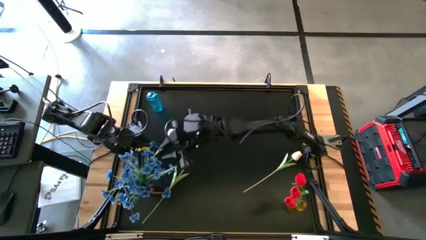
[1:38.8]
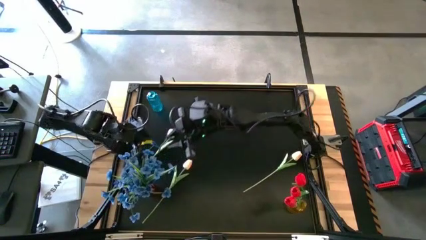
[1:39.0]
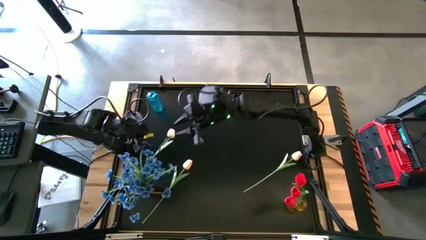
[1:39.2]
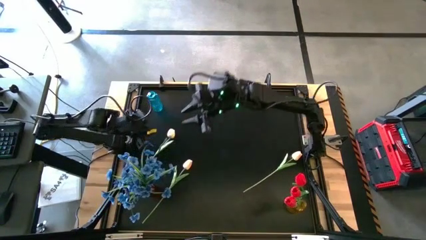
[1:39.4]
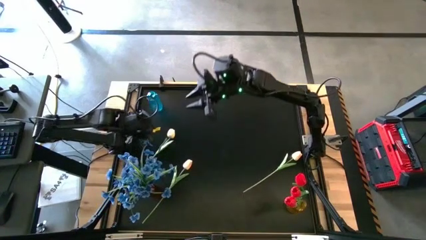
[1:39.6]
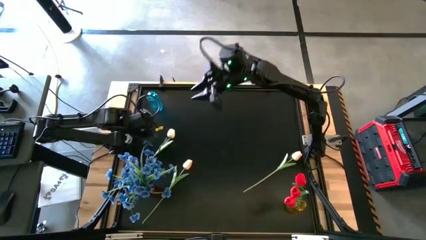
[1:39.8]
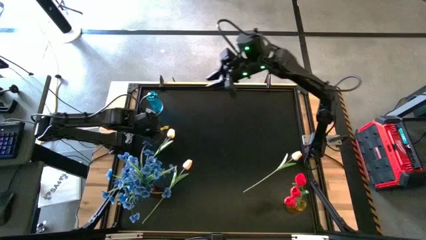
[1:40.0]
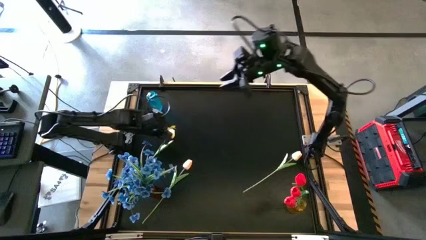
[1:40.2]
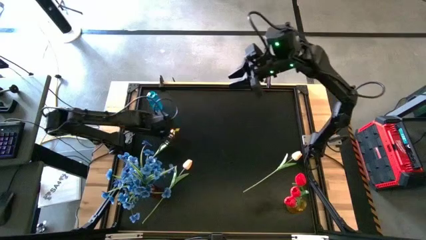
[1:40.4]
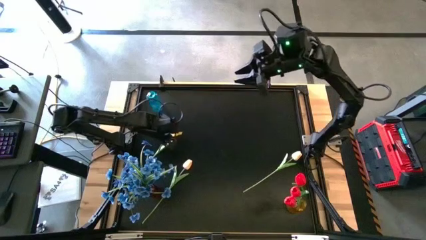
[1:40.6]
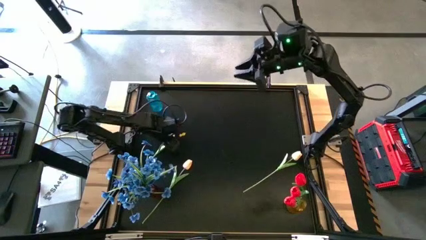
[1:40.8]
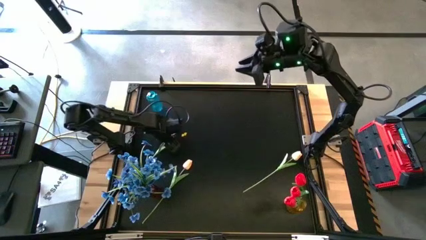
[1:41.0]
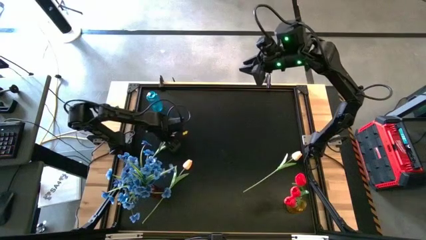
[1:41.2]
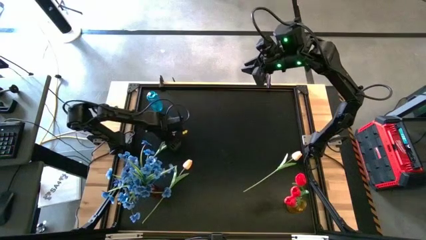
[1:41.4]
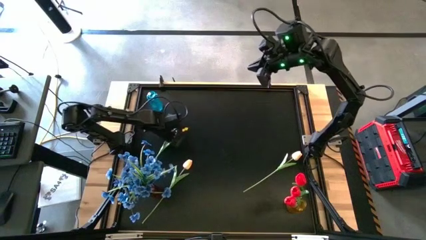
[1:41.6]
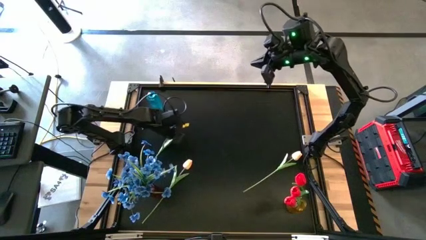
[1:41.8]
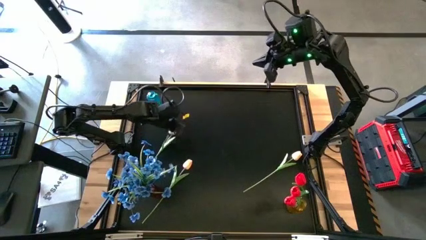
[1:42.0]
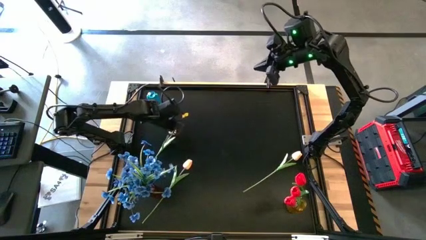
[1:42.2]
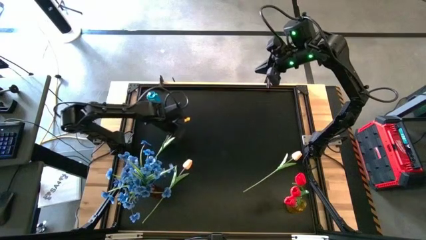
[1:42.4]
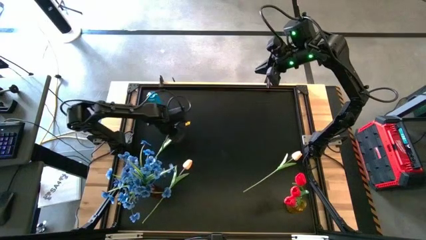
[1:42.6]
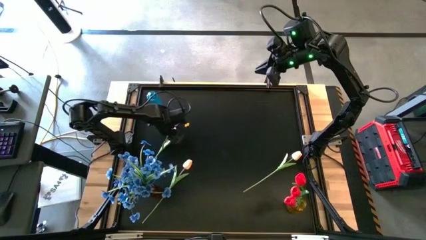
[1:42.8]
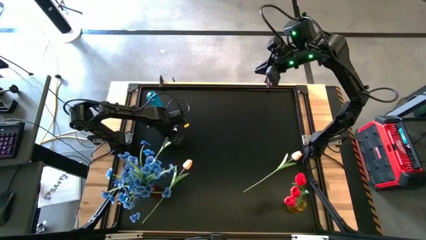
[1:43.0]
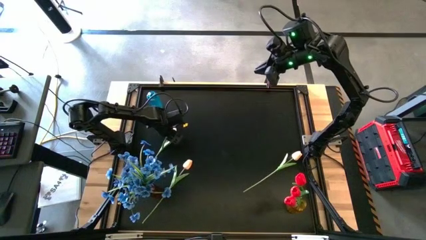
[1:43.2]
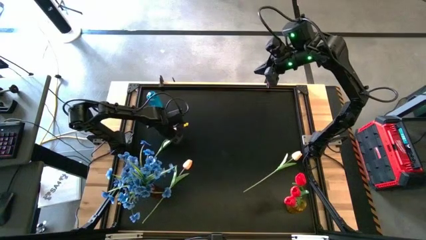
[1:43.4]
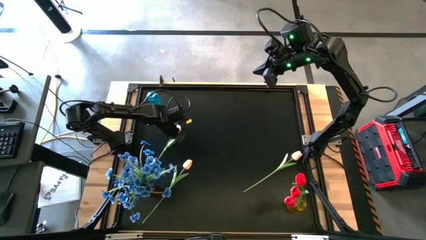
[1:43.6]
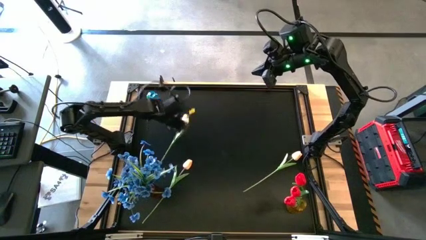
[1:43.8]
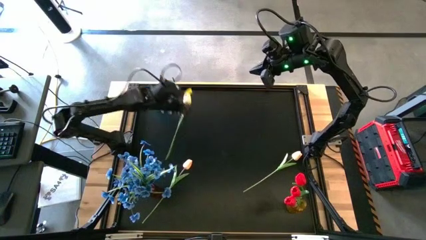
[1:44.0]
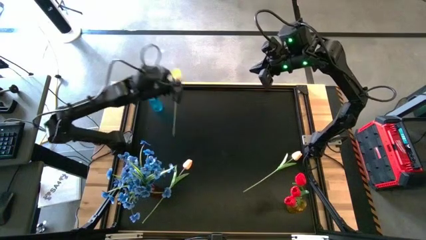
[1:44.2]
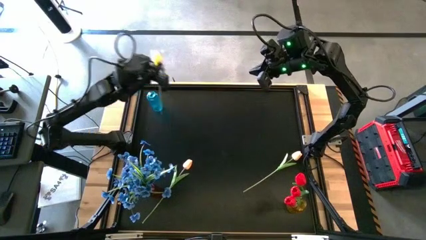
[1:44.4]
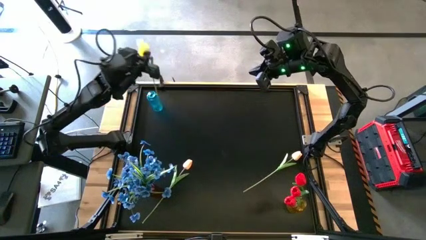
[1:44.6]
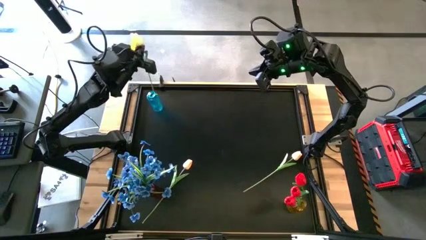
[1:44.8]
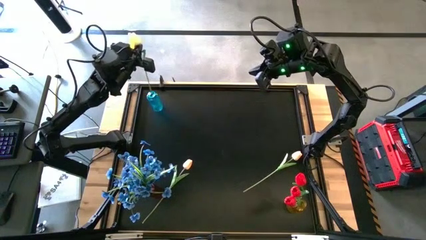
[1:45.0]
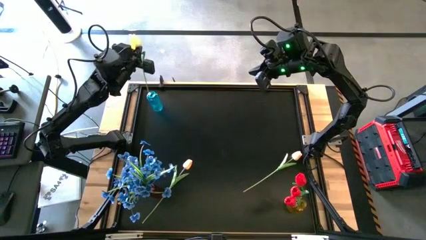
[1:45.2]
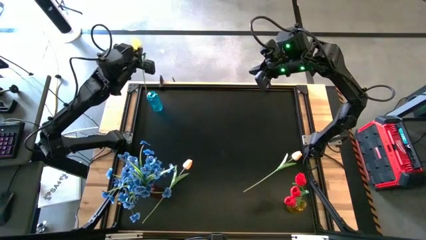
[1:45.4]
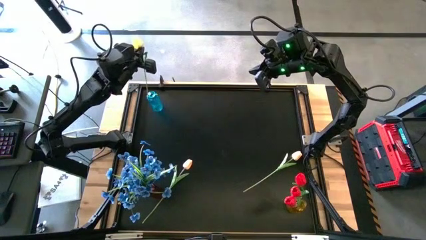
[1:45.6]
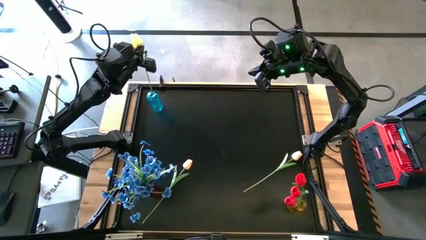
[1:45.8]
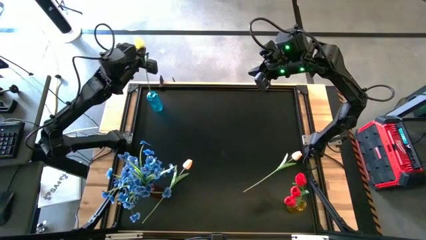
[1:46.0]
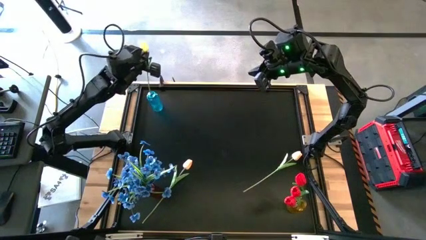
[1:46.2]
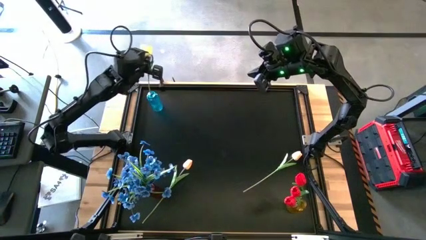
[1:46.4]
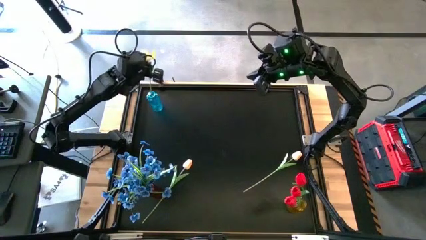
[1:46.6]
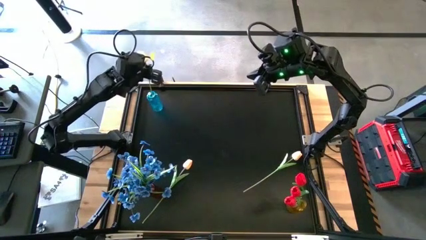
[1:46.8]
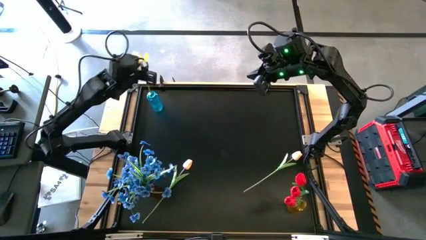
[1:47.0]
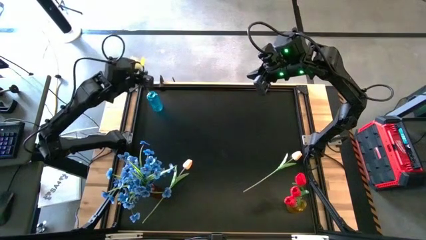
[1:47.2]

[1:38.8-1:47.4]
Task: Sort flowers into vase by color
Put the top white flower into the blue vase

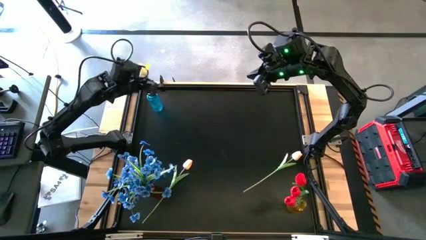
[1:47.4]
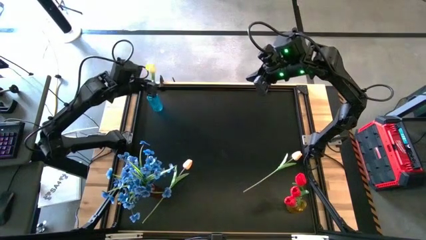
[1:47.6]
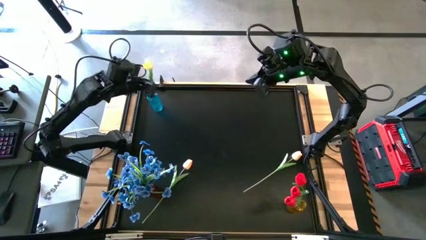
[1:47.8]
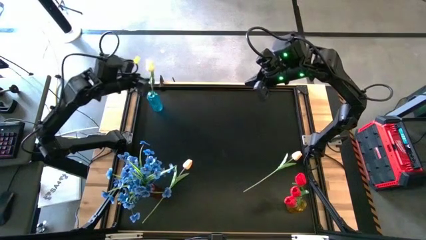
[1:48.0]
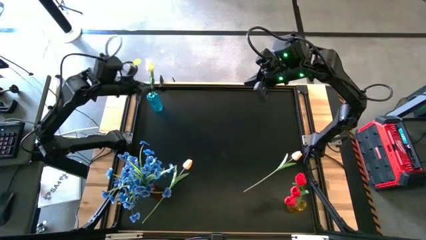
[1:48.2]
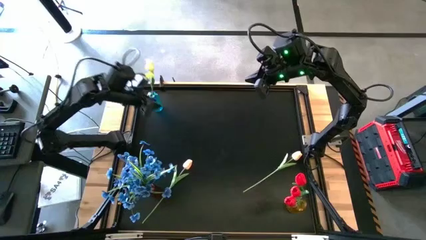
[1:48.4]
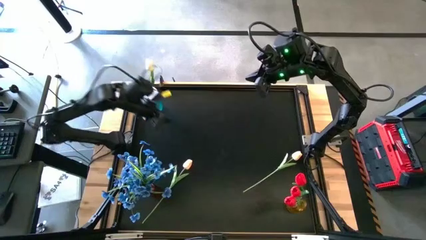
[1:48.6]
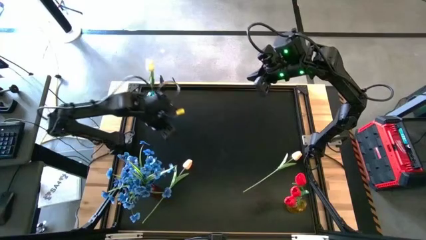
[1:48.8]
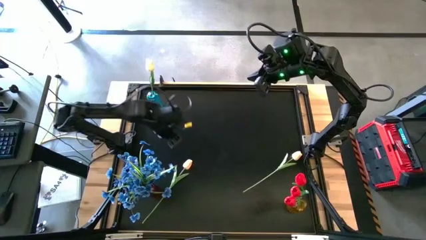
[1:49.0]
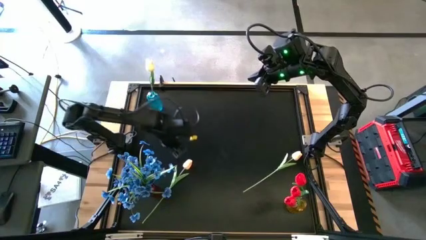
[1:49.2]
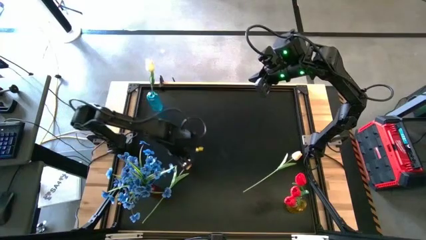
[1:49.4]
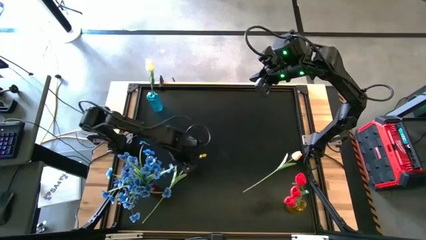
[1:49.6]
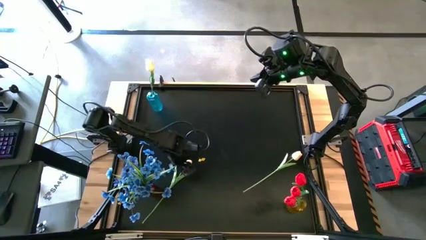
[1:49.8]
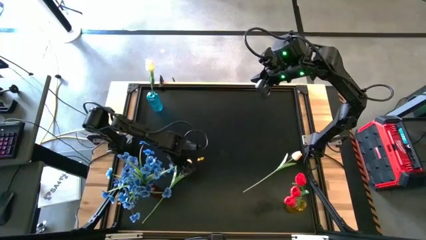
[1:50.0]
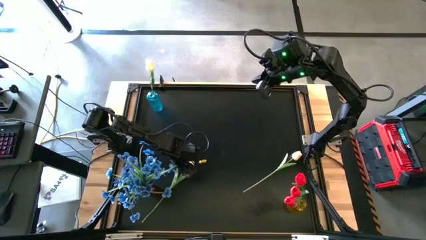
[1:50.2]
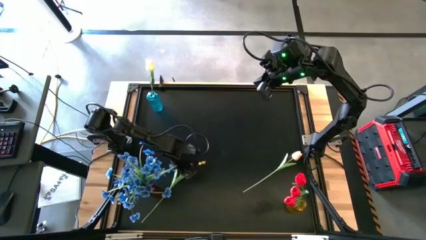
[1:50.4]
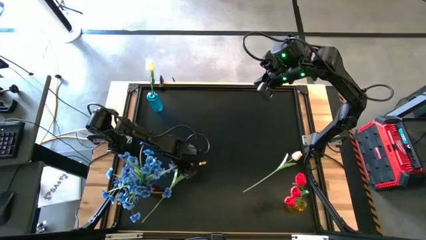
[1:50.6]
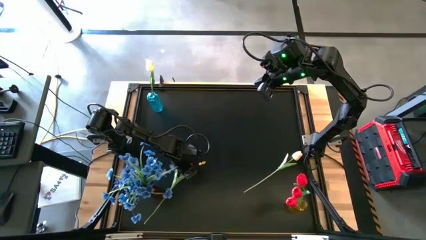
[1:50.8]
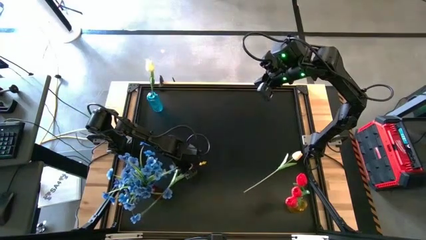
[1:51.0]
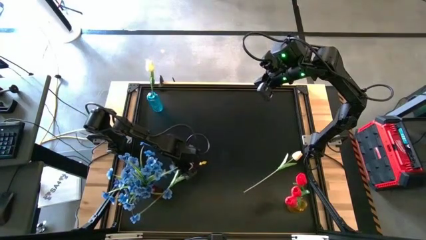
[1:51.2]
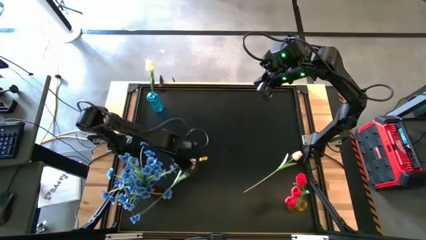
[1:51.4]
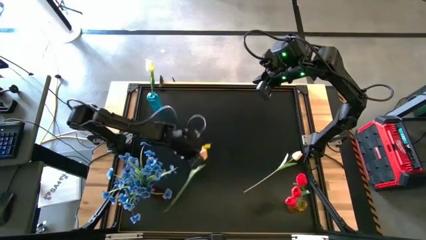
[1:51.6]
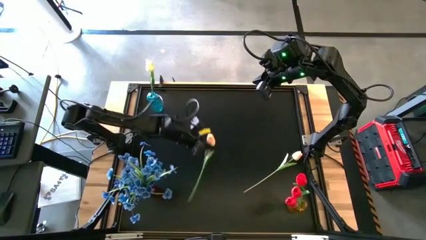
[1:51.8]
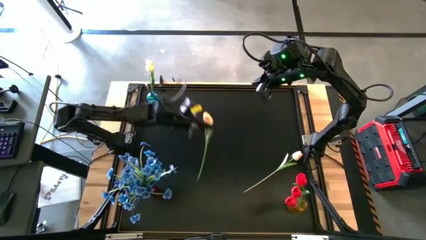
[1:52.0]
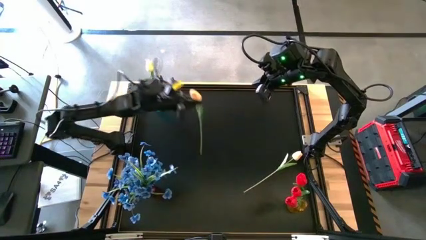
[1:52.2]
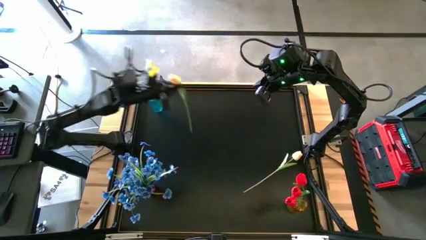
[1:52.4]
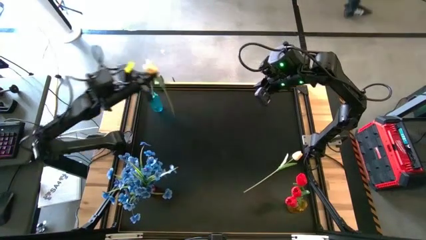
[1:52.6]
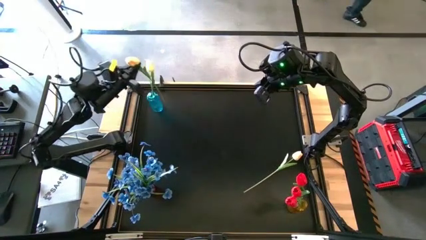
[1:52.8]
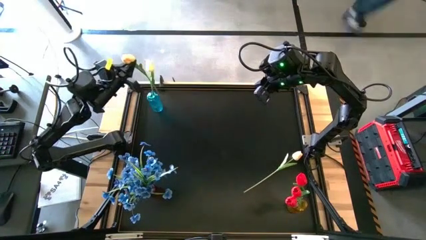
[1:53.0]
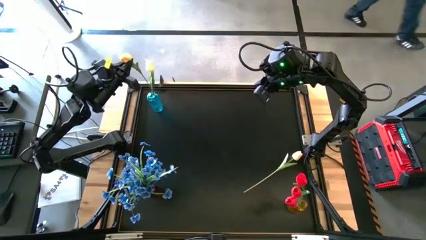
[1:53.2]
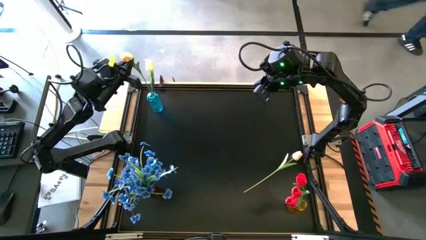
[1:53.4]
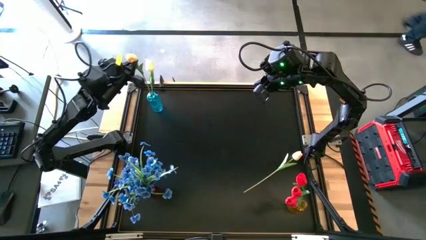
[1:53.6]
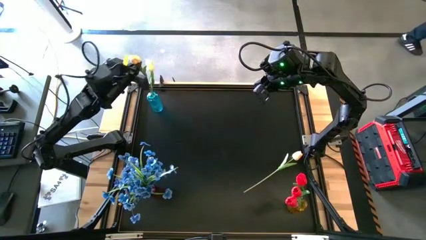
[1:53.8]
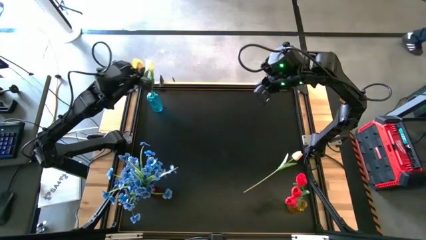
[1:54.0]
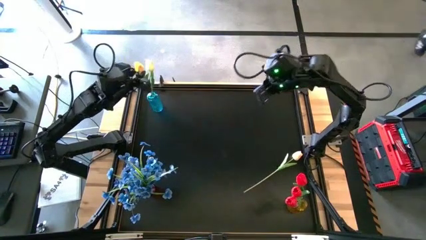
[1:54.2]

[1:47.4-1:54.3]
Put the left white flower into the blue vase
